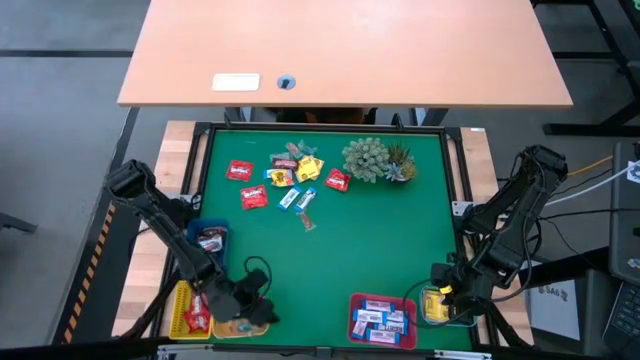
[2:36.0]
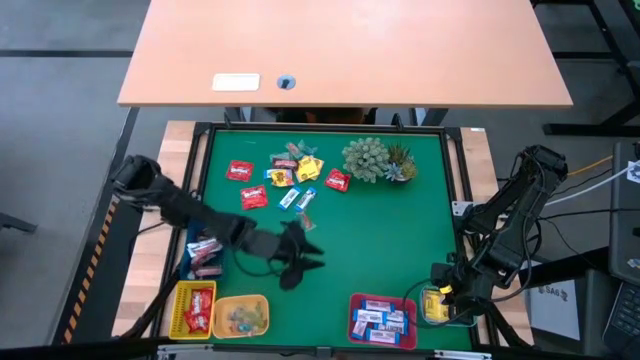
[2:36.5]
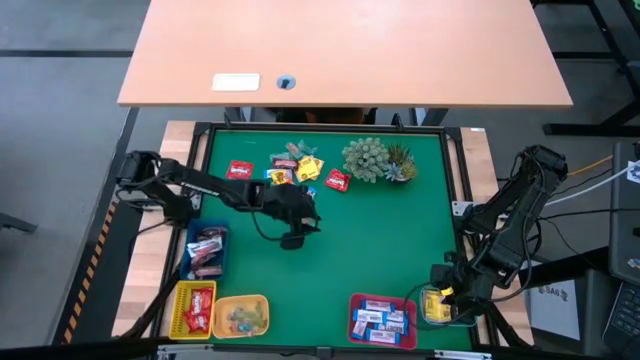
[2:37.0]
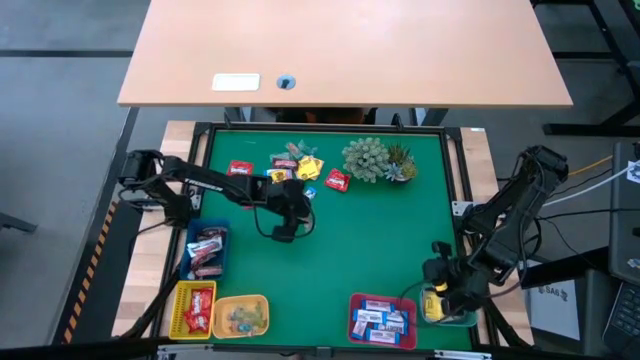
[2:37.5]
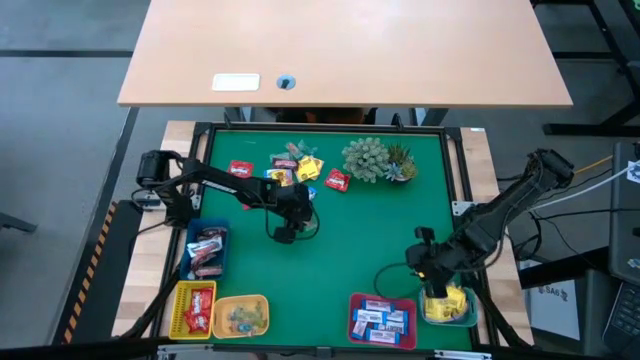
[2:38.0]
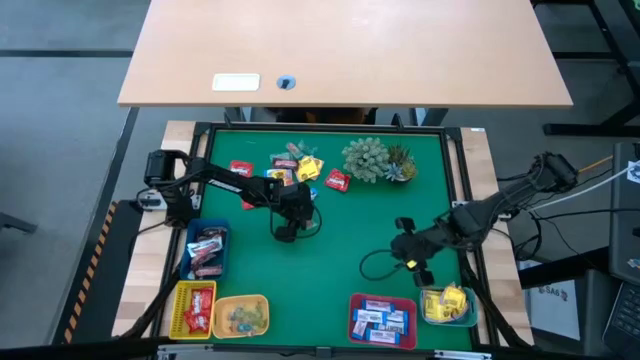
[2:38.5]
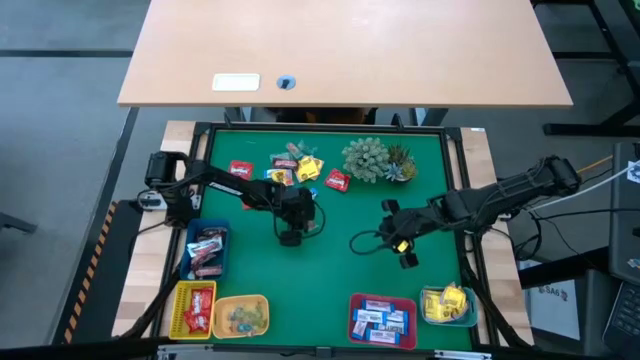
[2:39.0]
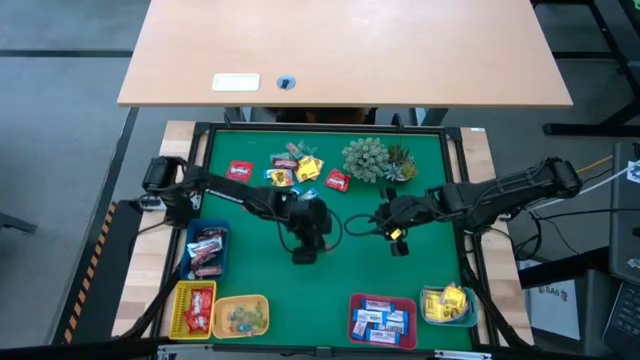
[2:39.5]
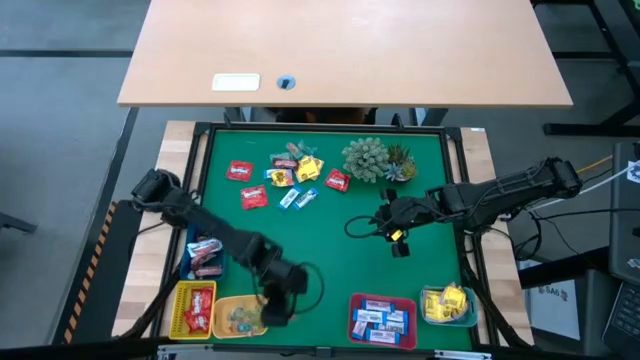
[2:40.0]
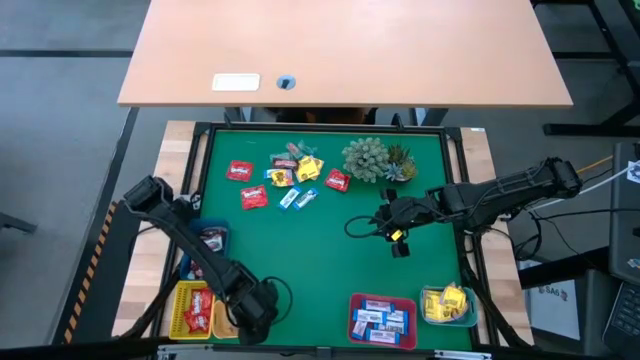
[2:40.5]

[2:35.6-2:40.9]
Task: Sort candy
Put the transparent candy into the orange bin

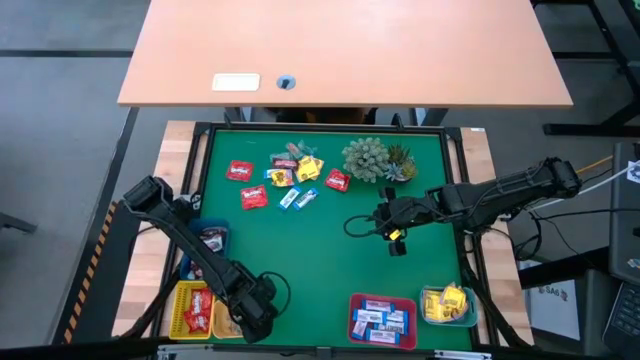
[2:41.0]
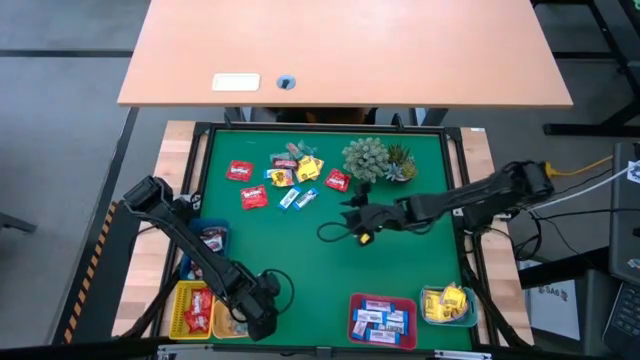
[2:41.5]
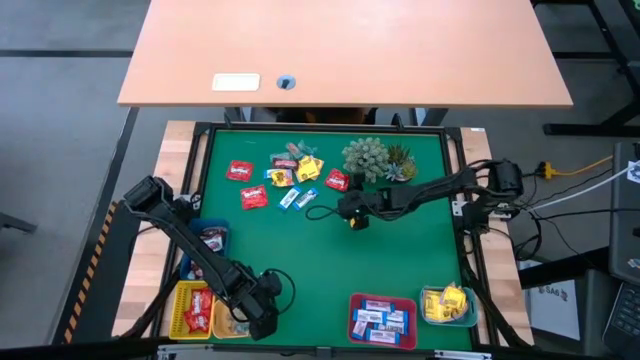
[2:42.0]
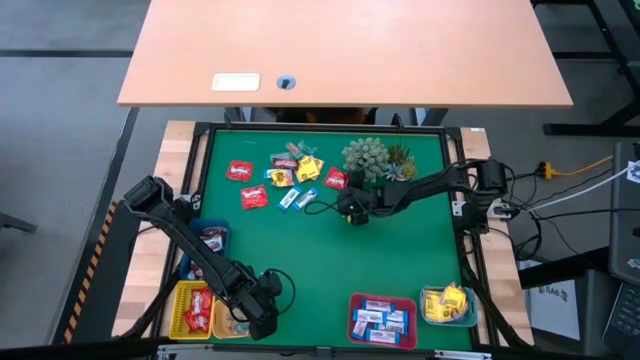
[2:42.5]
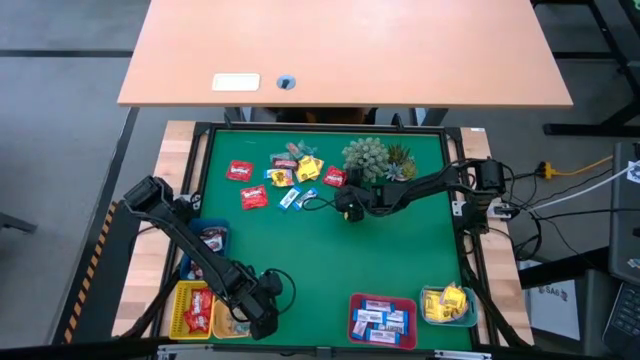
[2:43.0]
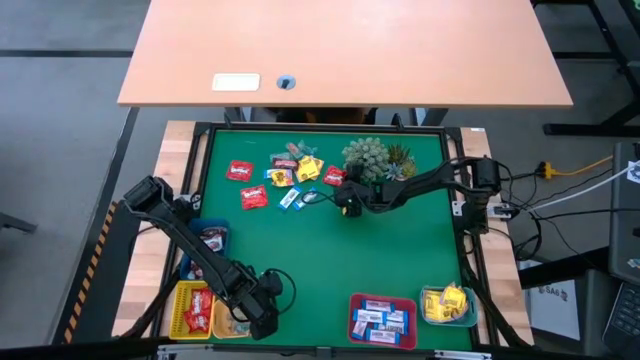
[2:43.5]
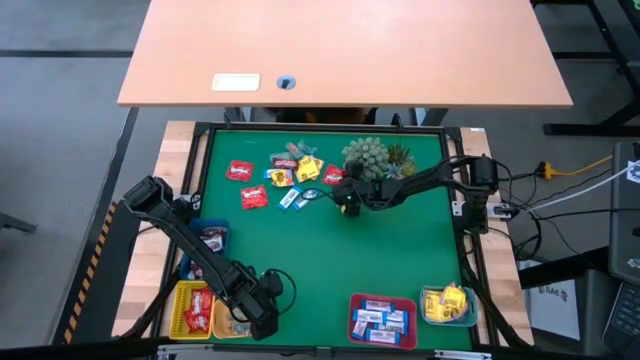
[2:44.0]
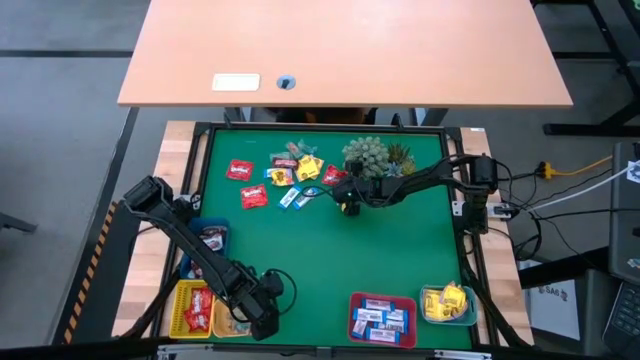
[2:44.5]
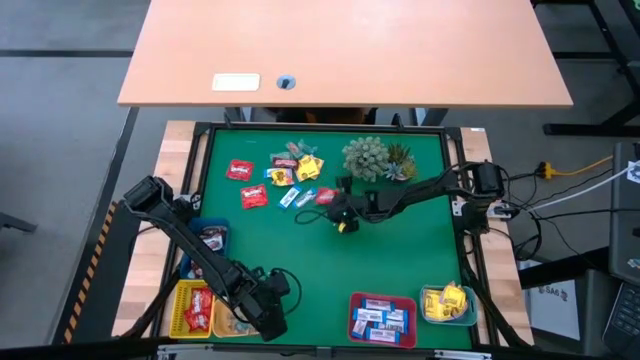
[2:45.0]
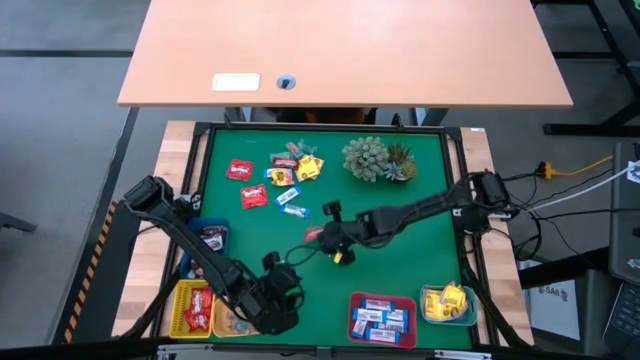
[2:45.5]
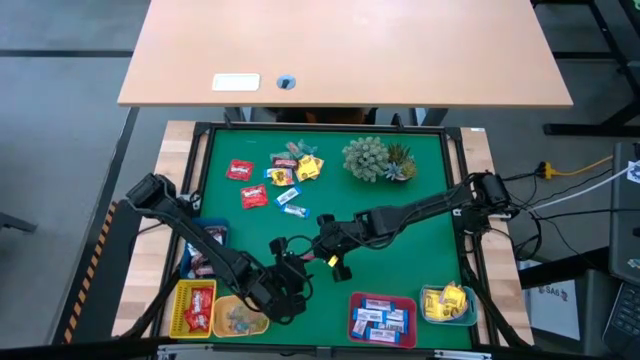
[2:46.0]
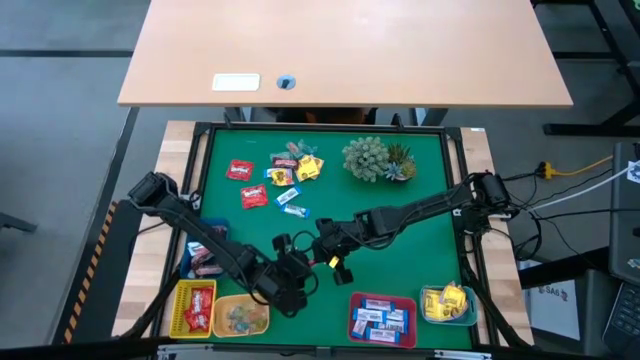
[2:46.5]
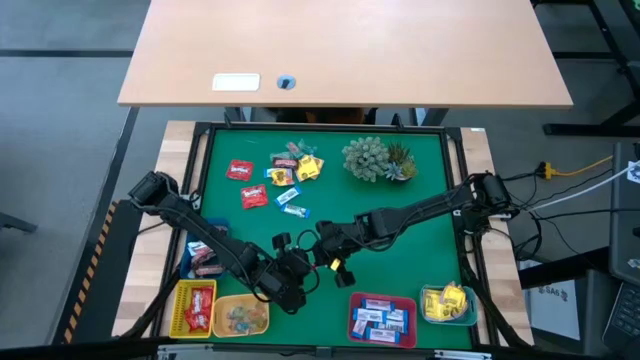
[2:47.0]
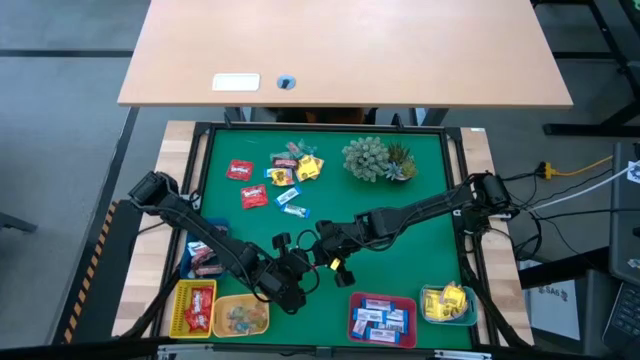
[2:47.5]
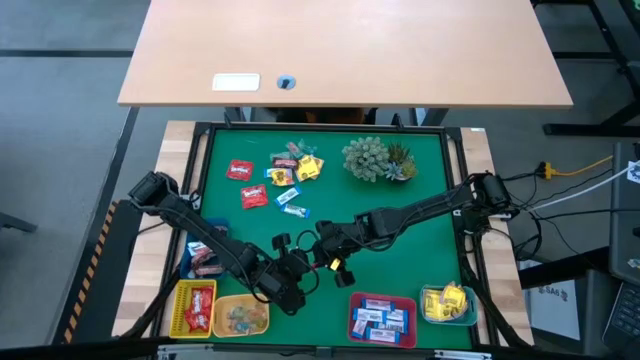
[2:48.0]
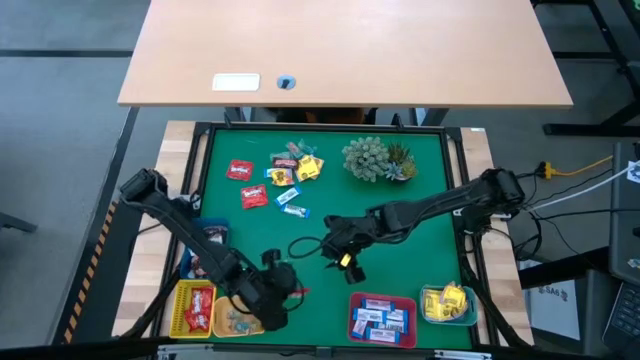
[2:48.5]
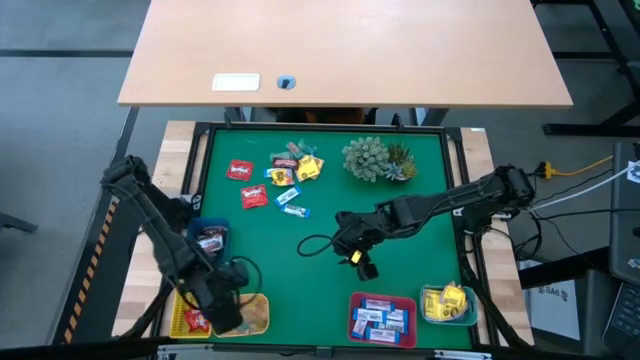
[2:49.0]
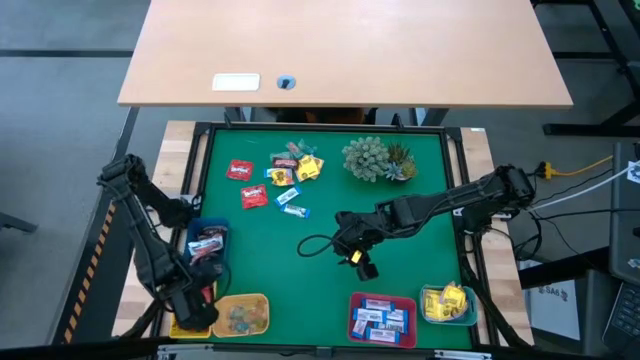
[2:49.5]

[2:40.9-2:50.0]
Put the red candy into the yellow bin

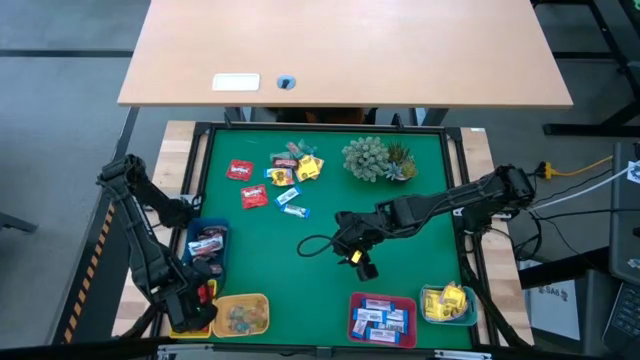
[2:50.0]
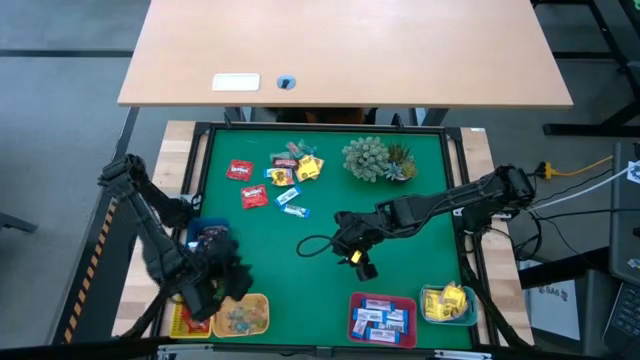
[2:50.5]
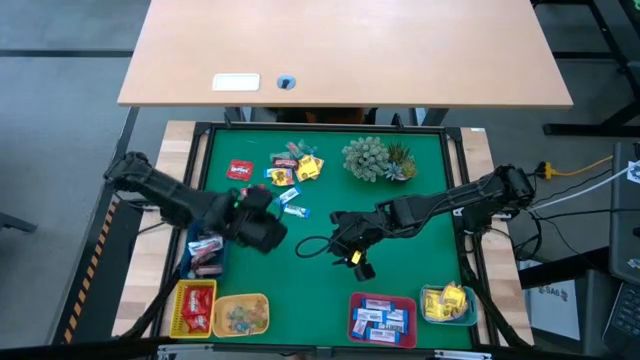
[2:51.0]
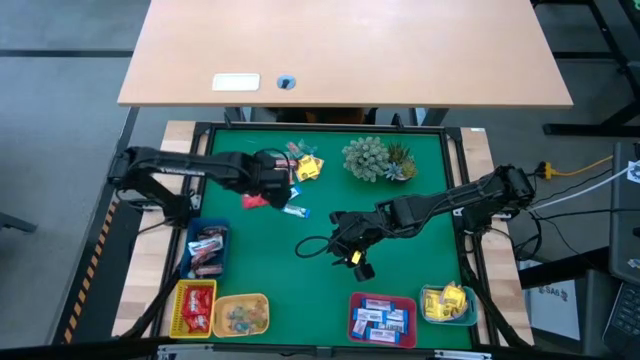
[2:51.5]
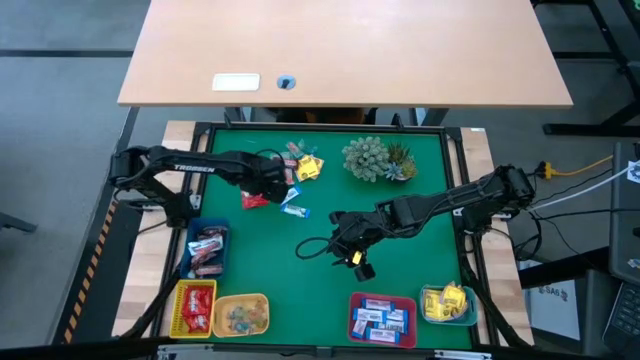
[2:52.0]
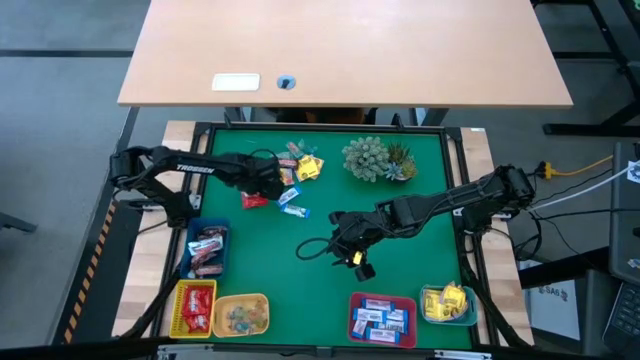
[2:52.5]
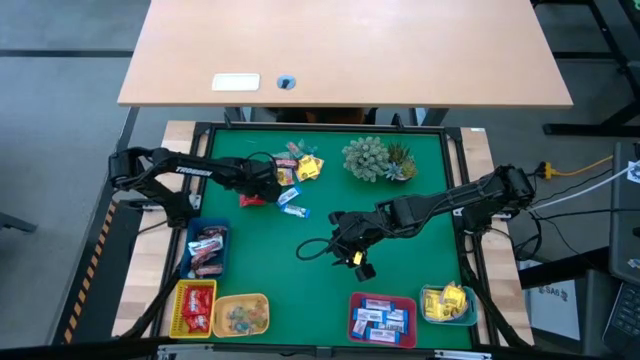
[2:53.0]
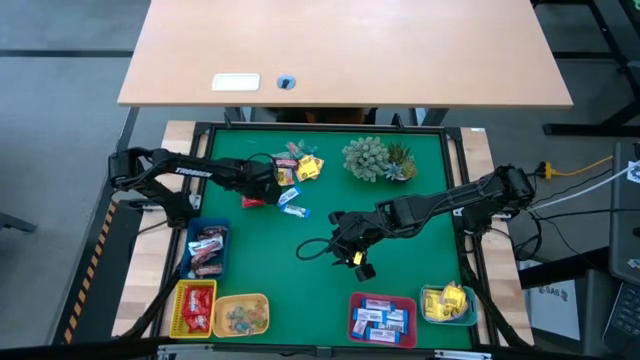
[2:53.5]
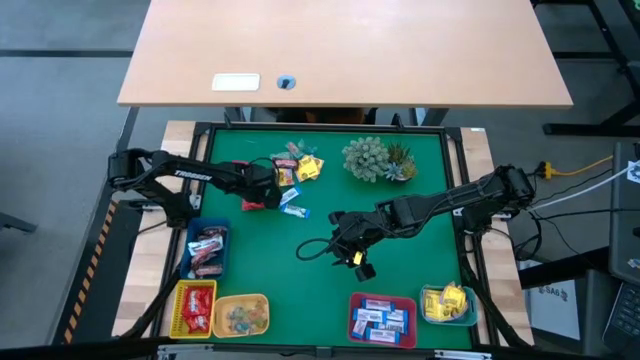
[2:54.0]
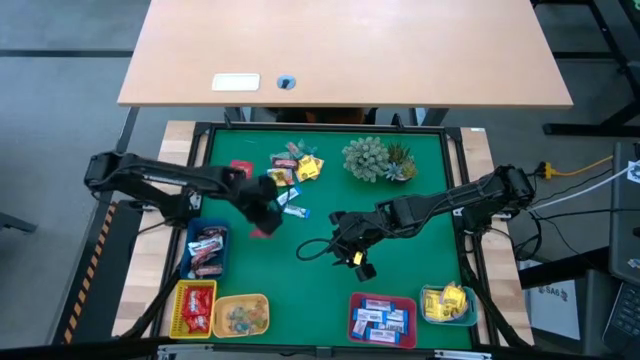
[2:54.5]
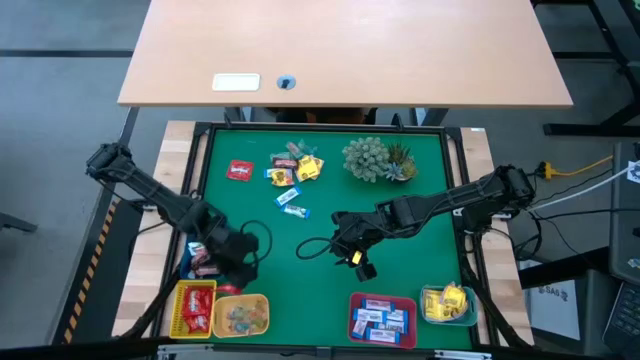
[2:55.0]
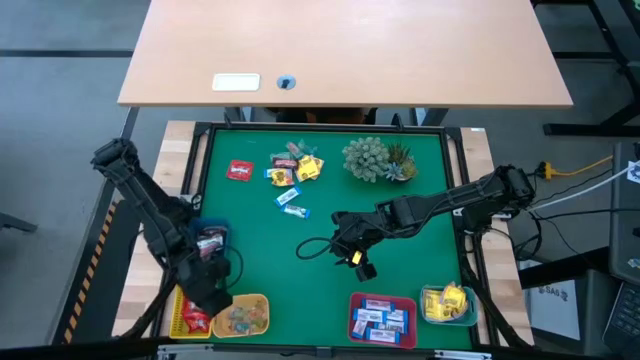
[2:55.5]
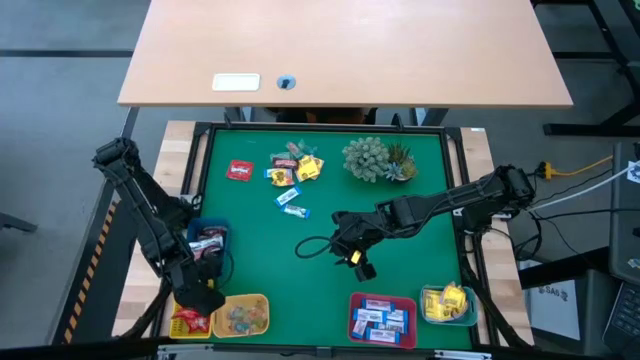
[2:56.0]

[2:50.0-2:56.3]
Put the red candy into the yellow bin
